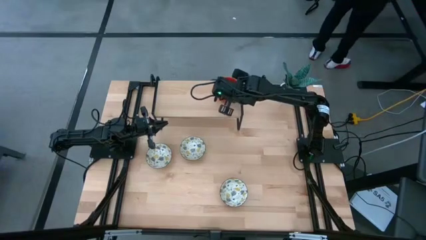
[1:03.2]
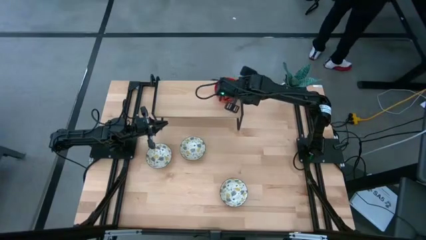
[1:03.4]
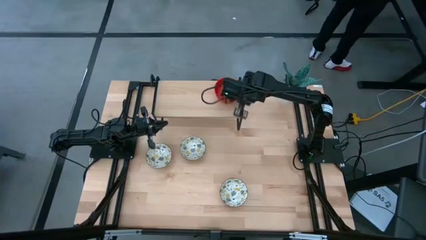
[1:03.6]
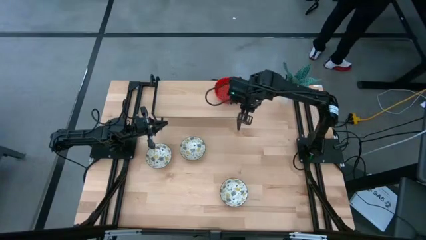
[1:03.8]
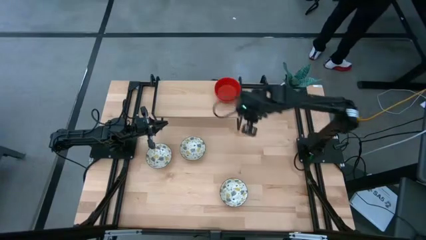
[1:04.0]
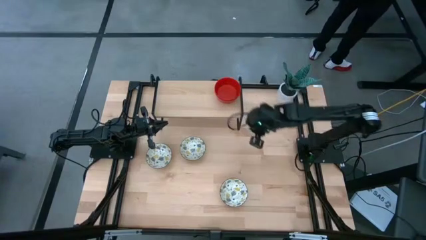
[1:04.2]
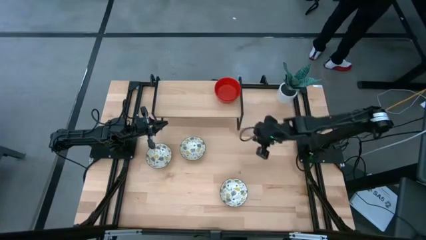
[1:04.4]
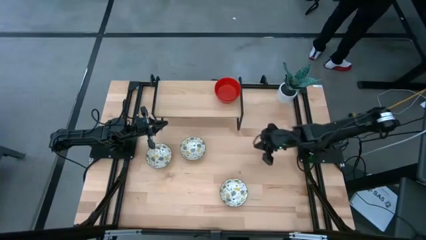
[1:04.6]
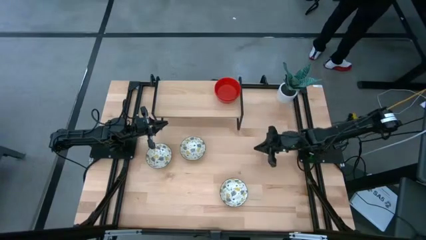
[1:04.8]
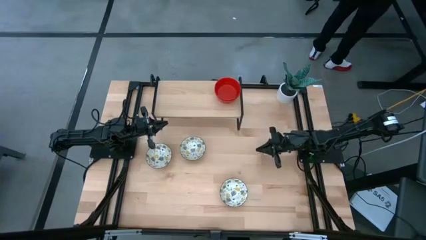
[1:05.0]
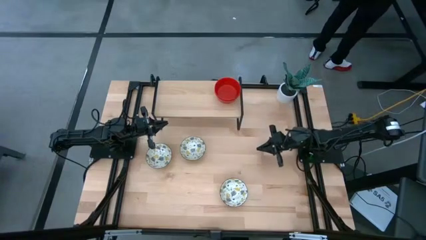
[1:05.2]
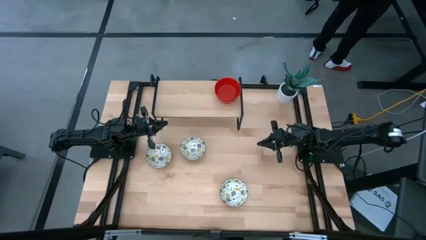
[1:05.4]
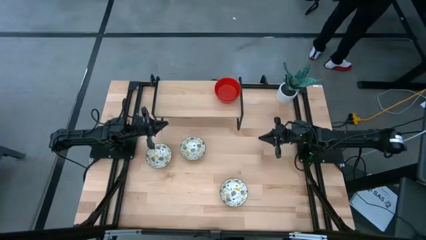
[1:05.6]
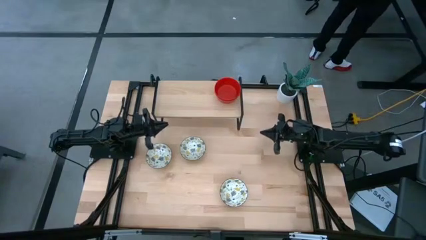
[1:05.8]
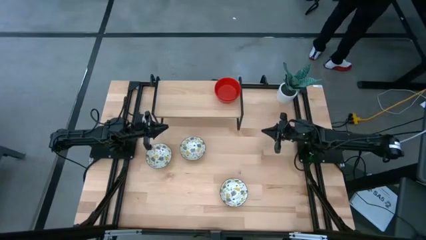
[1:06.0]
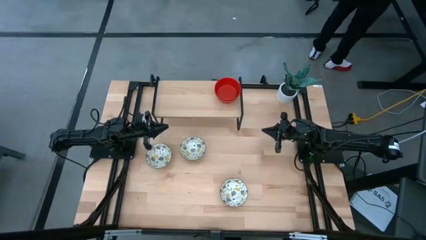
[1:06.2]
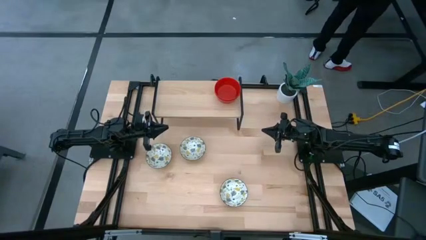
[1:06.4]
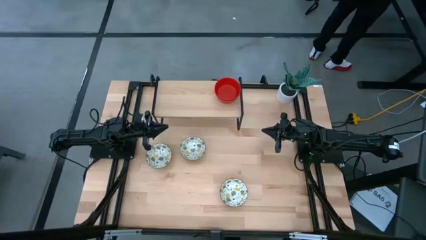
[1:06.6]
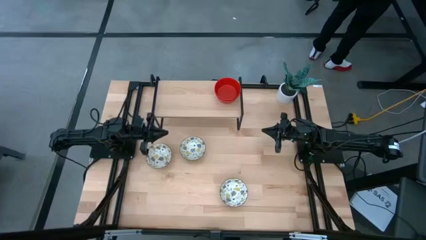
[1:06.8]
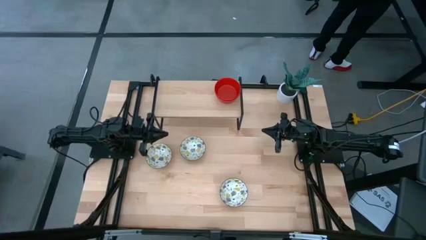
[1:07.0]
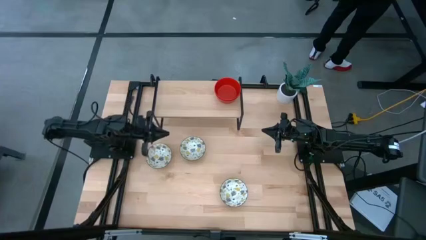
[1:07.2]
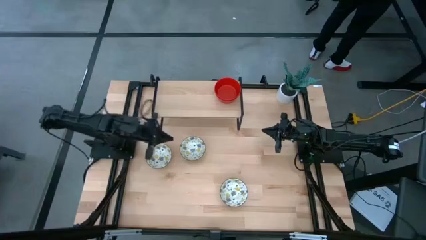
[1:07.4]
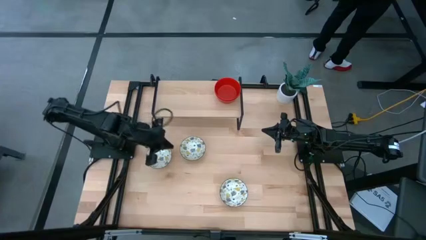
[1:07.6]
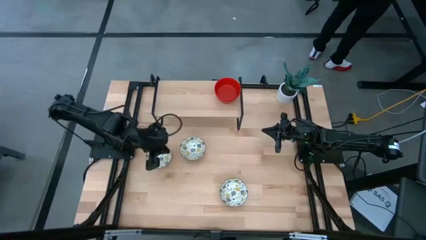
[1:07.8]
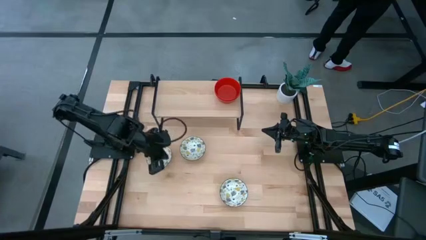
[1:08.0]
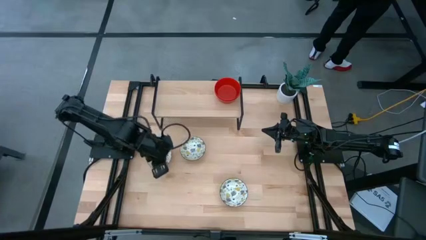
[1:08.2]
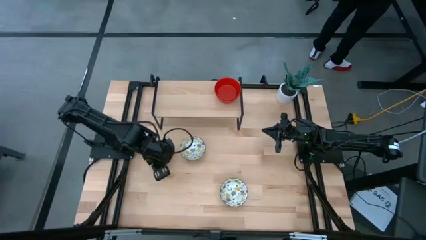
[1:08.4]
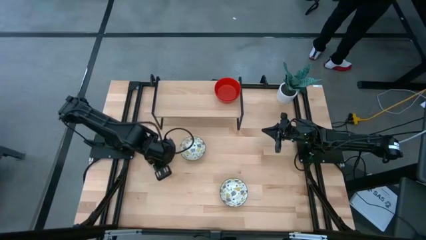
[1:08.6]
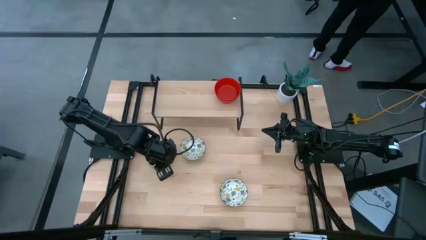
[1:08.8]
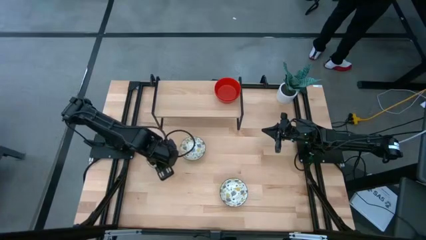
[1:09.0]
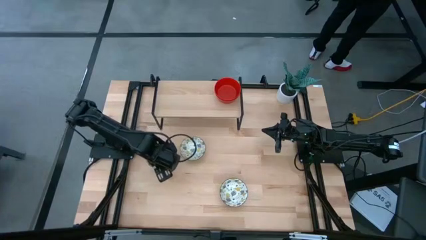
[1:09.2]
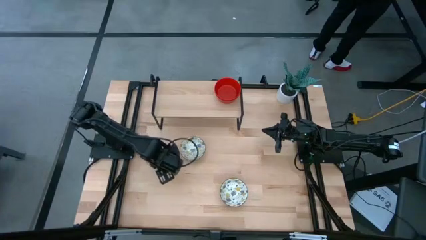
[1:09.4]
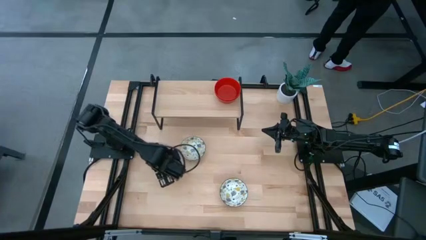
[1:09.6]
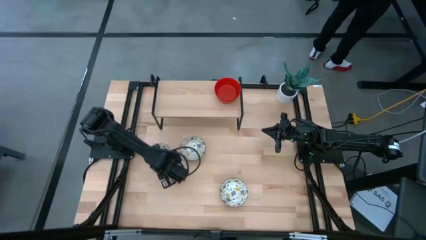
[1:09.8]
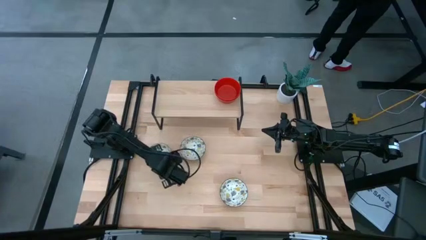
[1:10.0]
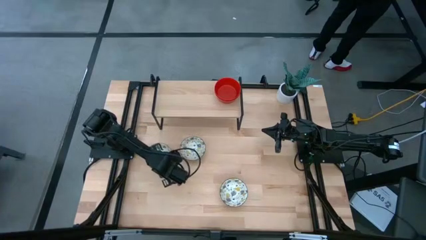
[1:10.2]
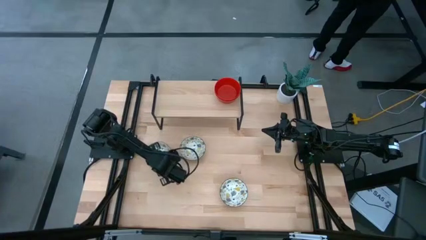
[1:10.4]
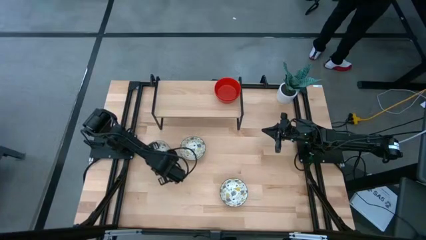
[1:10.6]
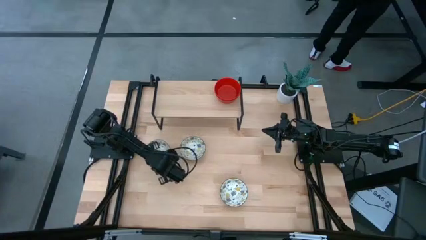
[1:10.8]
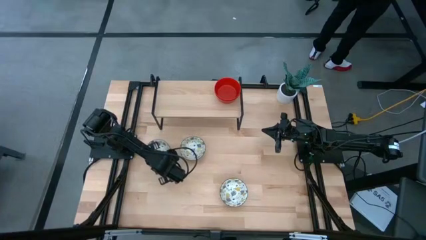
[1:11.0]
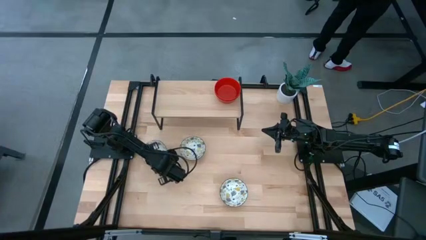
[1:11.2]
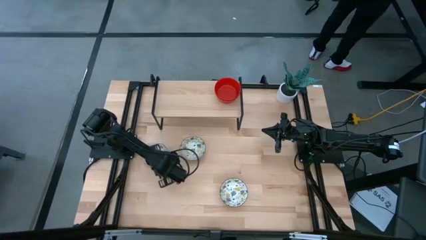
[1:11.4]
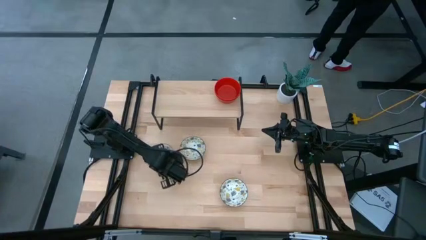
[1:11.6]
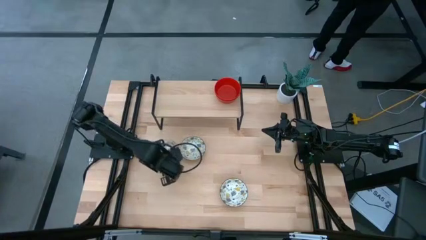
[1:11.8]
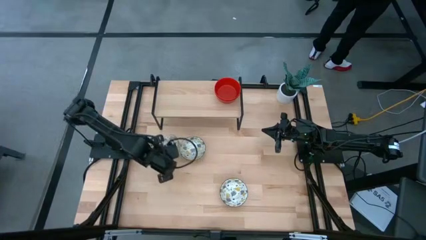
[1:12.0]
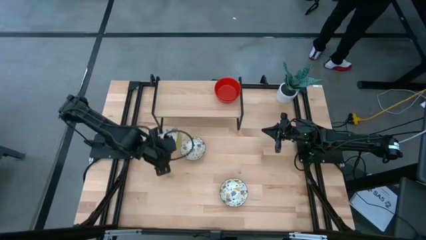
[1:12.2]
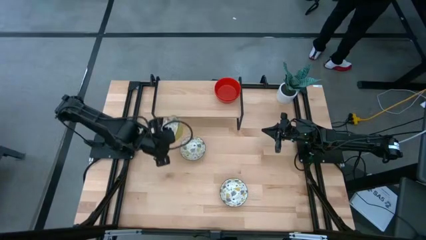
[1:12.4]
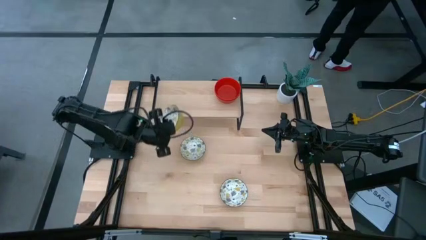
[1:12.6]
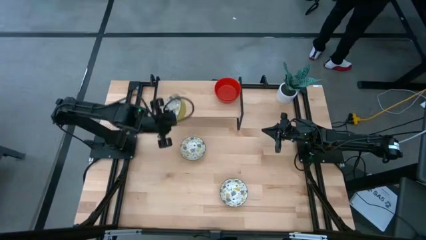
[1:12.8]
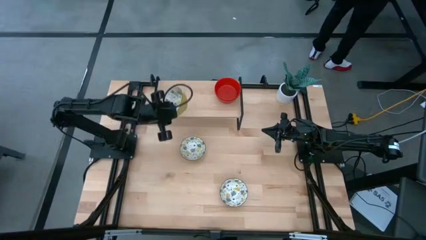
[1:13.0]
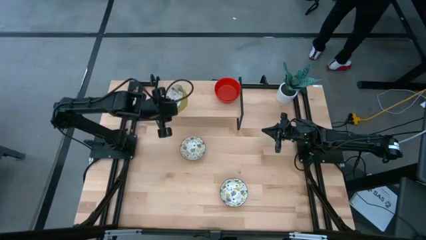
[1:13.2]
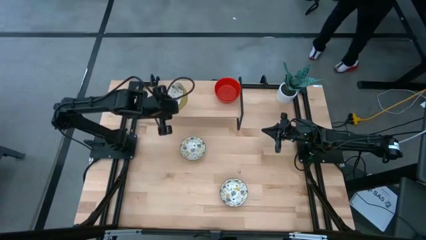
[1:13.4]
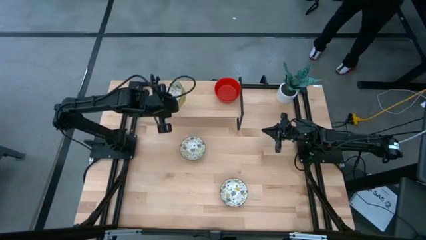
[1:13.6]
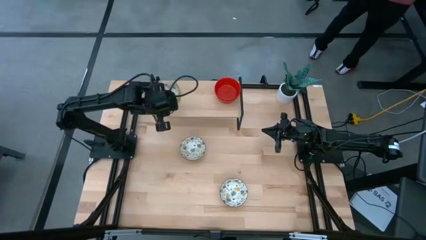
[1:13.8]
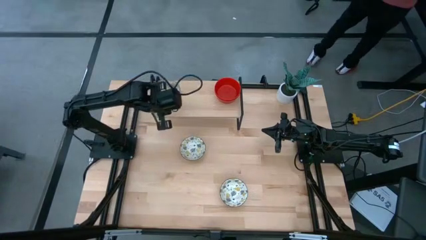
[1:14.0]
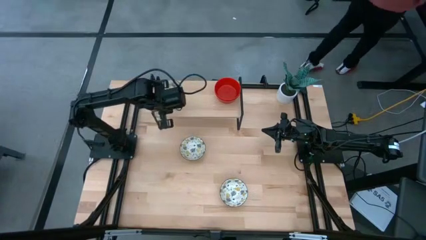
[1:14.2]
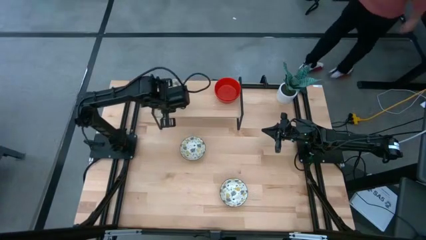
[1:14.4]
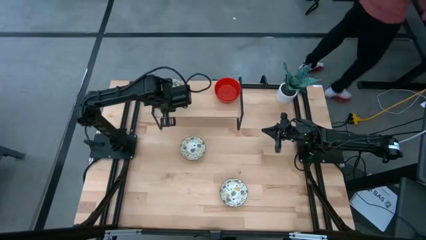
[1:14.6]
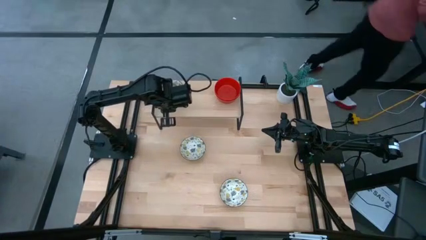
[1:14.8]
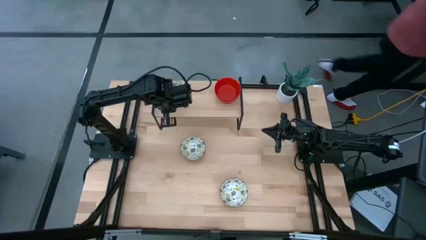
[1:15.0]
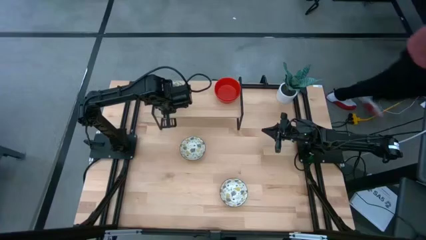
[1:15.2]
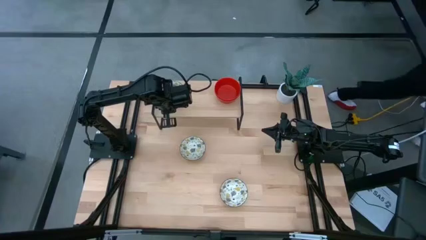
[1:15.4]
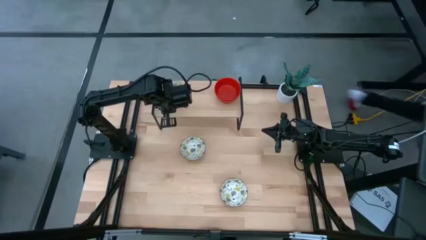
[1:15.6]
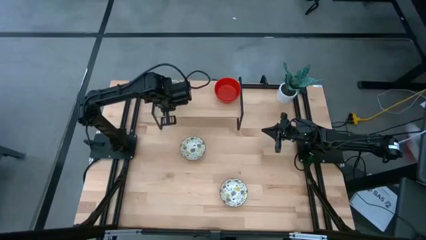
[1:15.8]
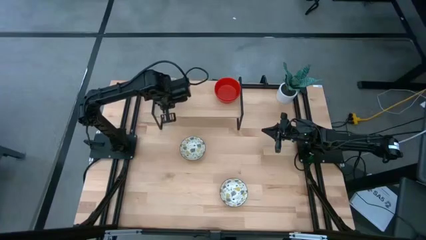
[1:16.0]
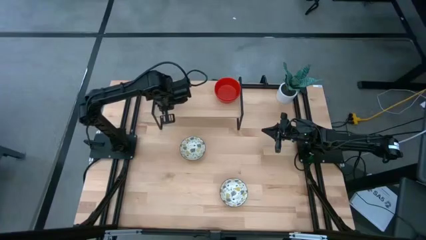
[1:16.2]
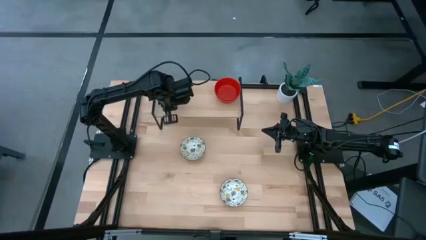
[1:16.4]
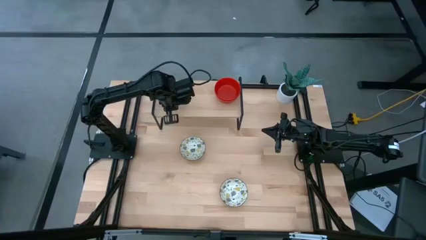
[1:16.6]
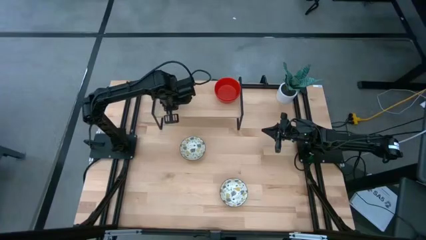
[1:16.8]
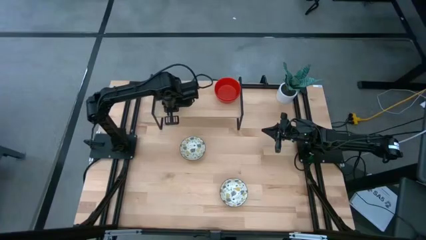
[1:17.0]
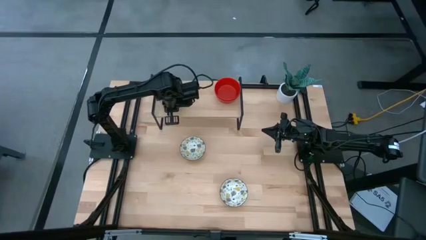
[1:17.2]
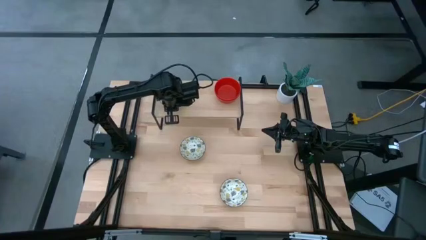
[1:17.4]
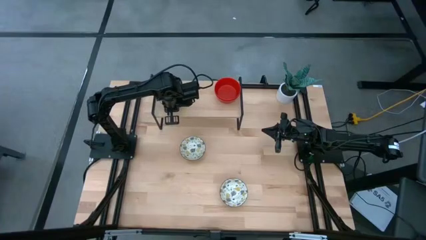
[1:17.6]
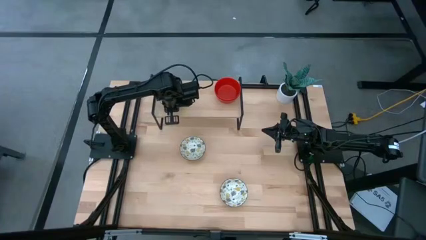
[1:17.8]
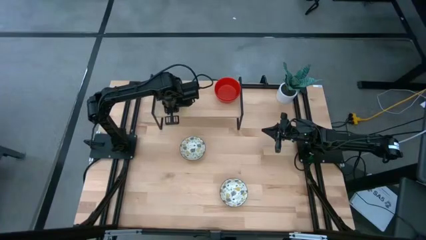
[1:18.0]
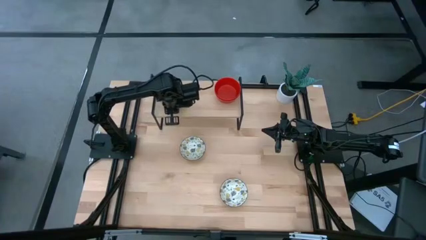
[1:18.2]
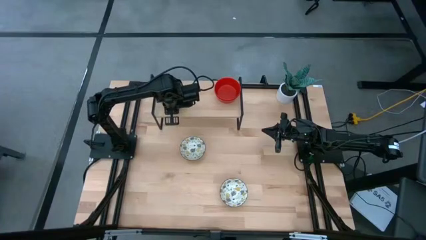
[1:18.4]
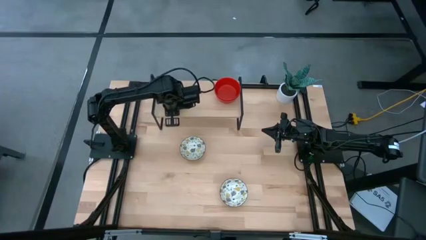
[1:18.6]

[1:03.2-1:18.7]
Task: Pick & Place Mini bowls
Put the top left yellow patterned bowl on the shelf
